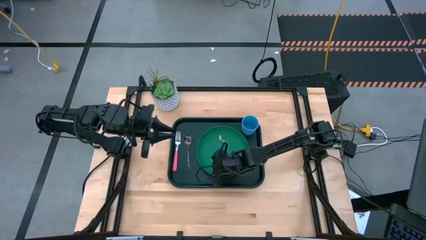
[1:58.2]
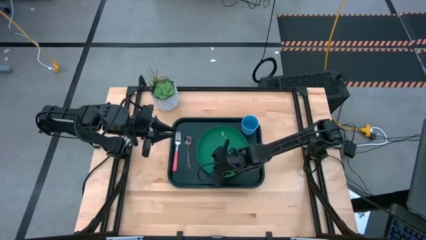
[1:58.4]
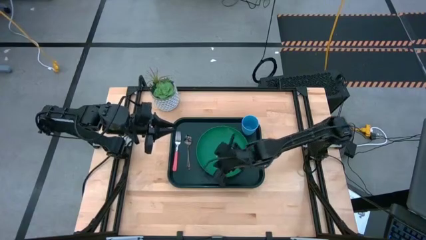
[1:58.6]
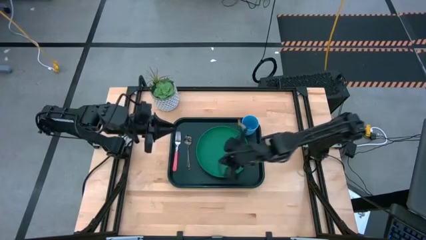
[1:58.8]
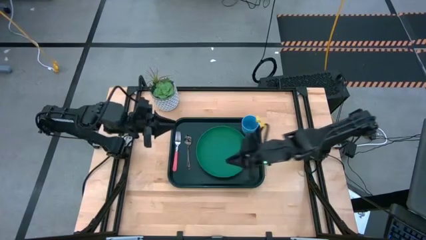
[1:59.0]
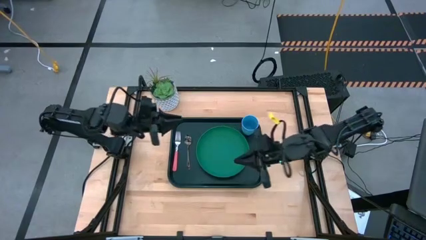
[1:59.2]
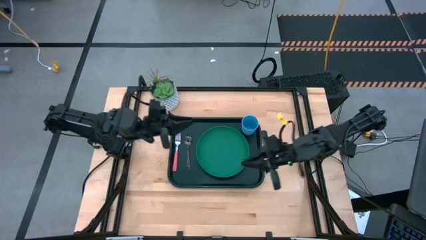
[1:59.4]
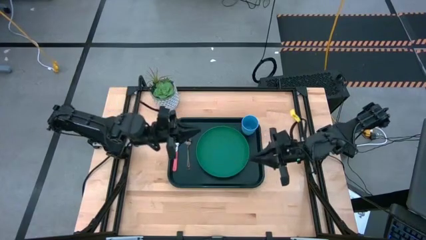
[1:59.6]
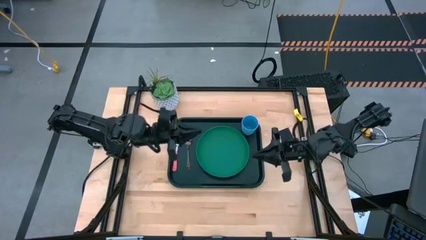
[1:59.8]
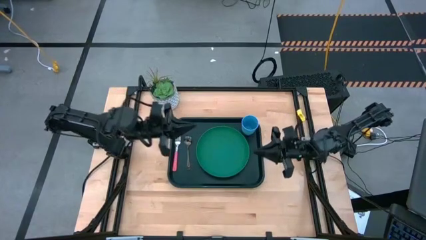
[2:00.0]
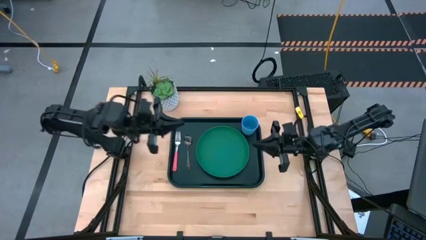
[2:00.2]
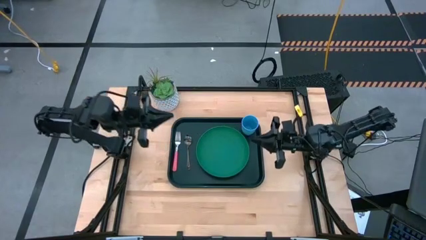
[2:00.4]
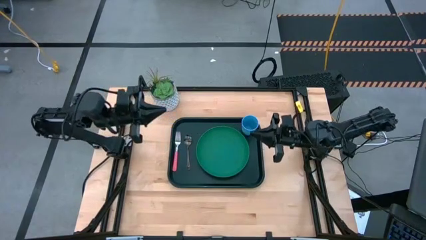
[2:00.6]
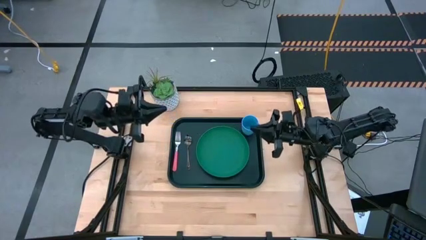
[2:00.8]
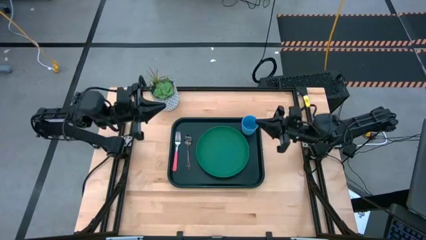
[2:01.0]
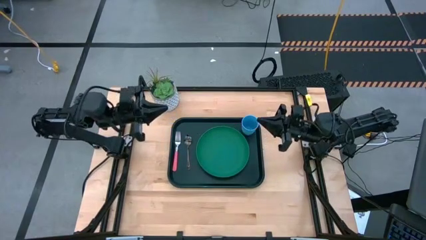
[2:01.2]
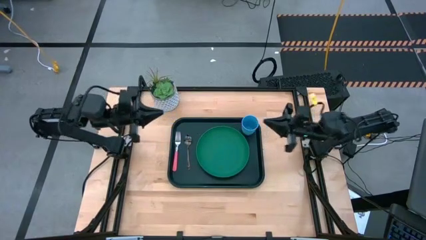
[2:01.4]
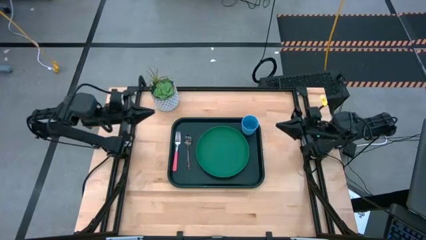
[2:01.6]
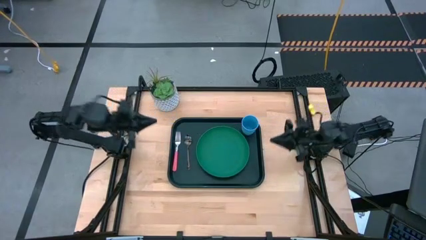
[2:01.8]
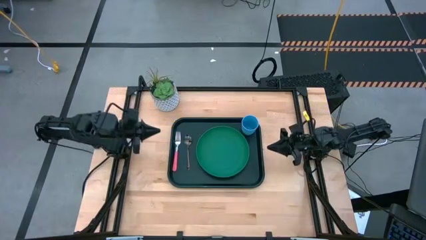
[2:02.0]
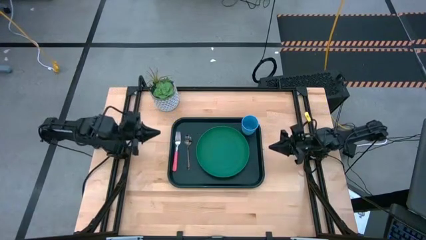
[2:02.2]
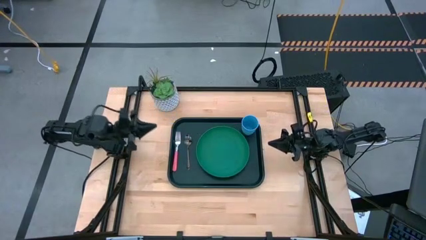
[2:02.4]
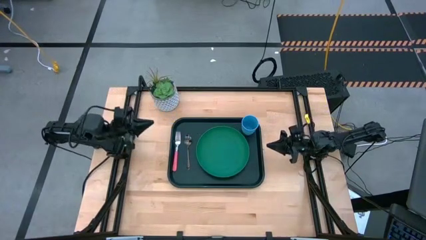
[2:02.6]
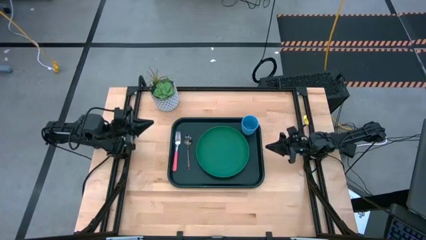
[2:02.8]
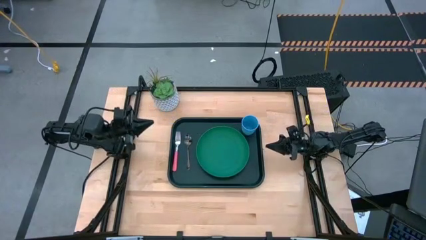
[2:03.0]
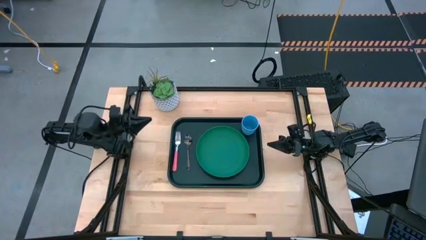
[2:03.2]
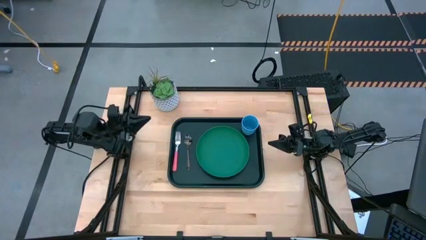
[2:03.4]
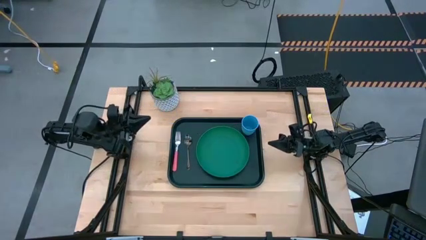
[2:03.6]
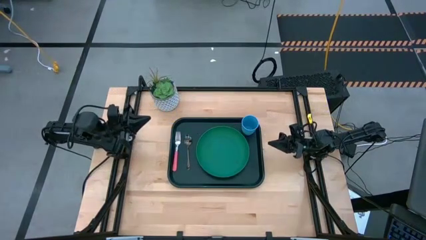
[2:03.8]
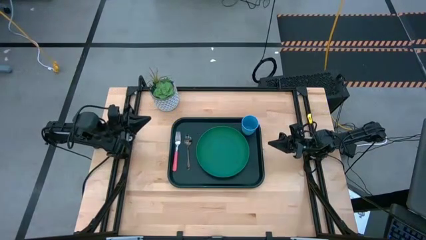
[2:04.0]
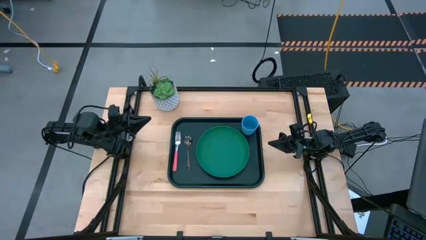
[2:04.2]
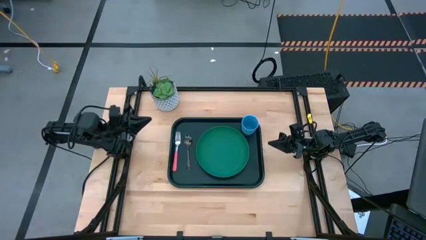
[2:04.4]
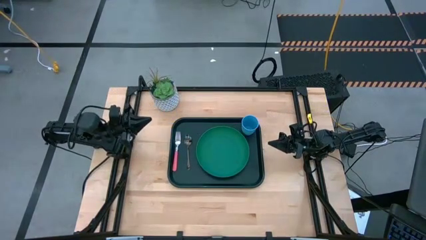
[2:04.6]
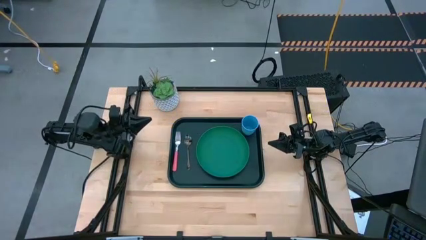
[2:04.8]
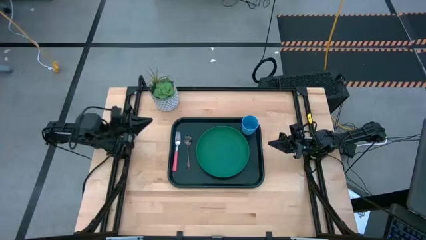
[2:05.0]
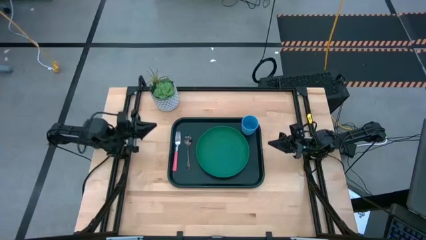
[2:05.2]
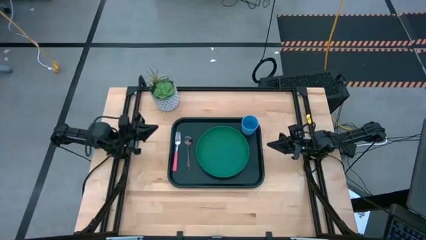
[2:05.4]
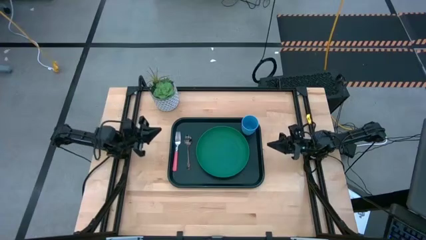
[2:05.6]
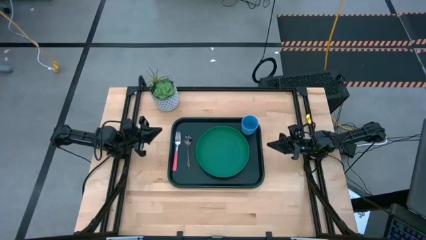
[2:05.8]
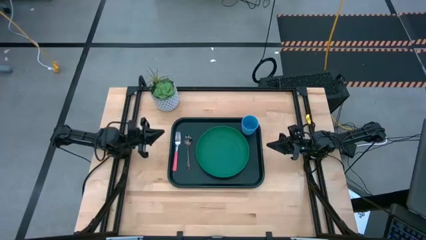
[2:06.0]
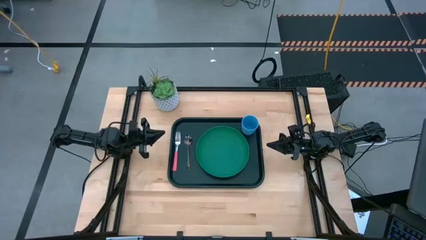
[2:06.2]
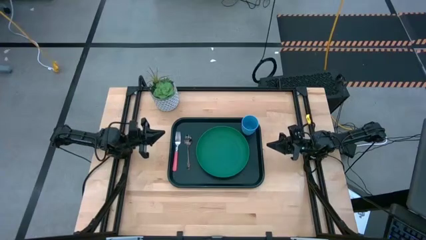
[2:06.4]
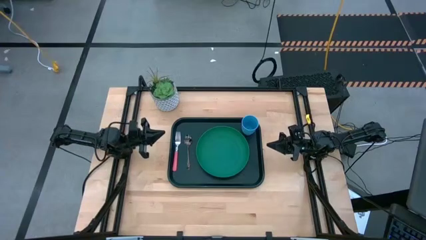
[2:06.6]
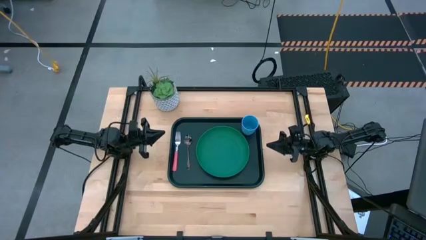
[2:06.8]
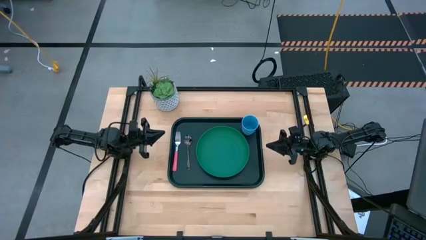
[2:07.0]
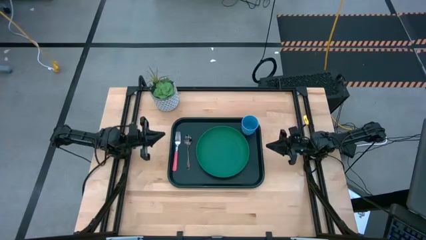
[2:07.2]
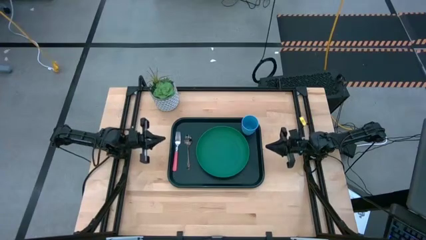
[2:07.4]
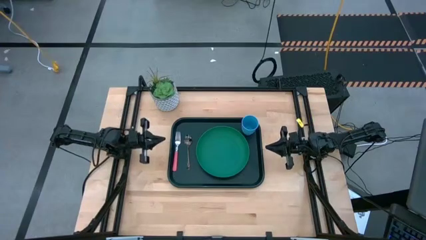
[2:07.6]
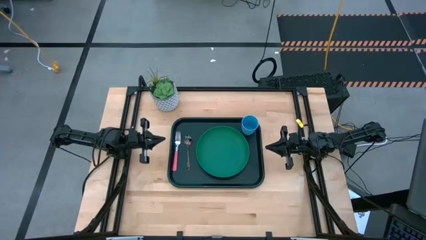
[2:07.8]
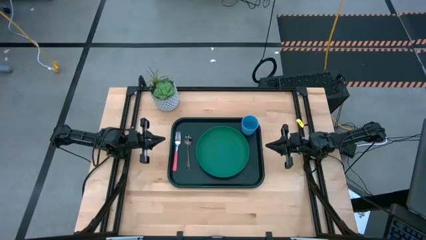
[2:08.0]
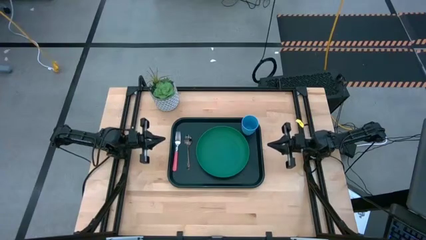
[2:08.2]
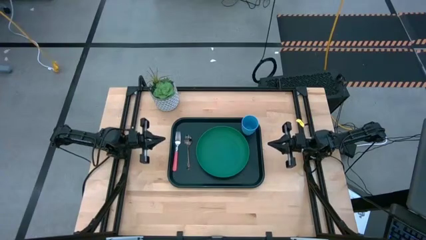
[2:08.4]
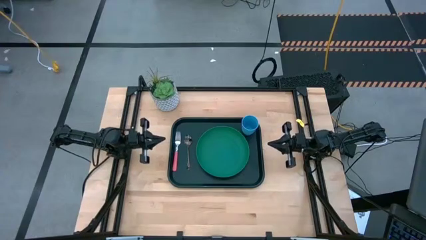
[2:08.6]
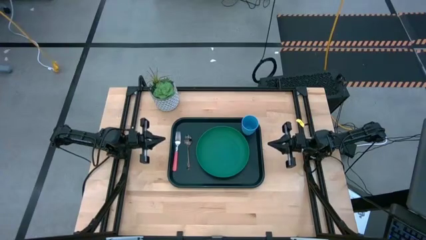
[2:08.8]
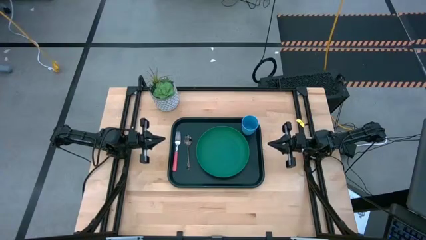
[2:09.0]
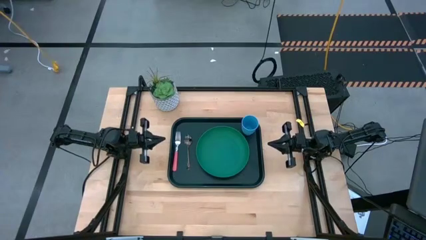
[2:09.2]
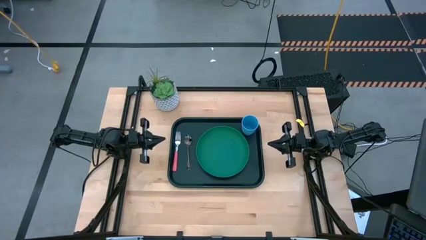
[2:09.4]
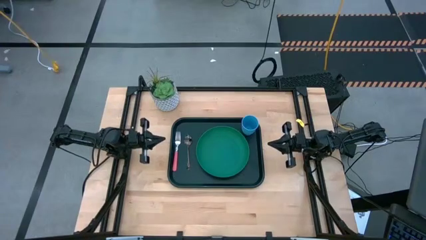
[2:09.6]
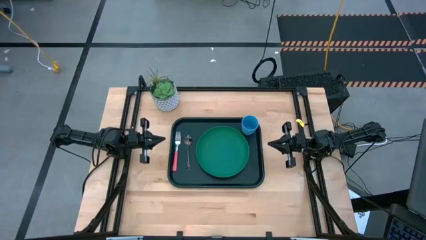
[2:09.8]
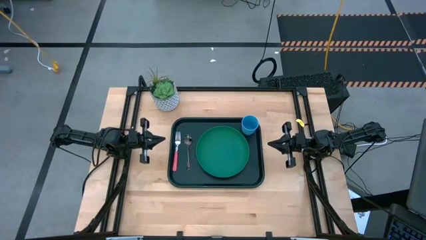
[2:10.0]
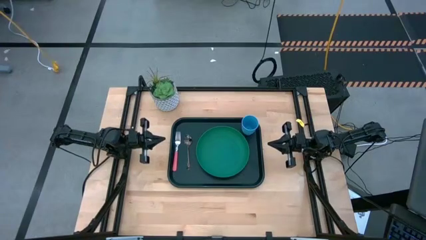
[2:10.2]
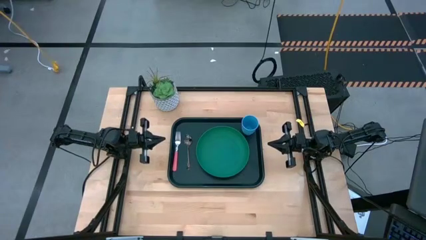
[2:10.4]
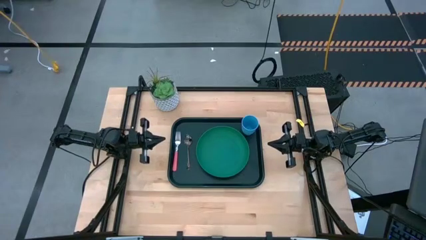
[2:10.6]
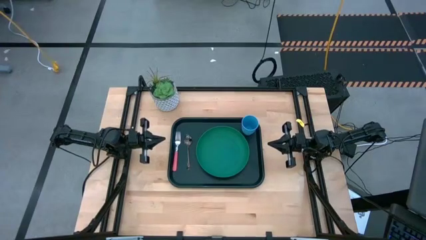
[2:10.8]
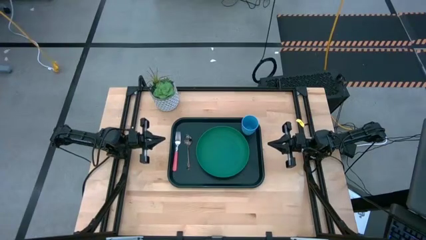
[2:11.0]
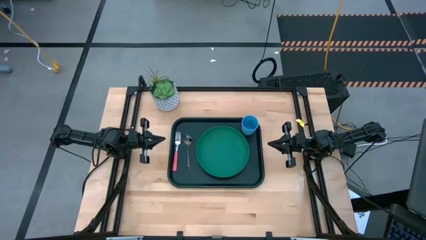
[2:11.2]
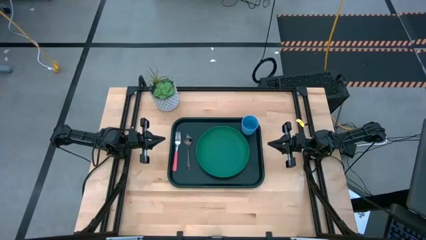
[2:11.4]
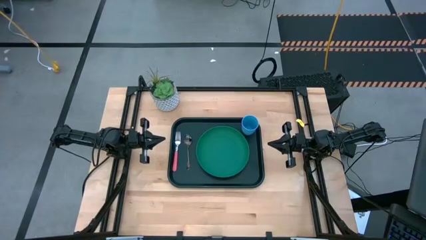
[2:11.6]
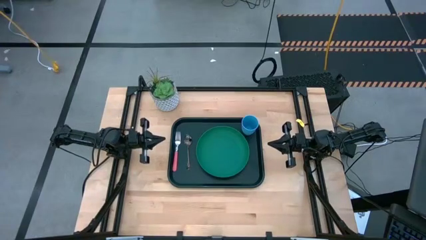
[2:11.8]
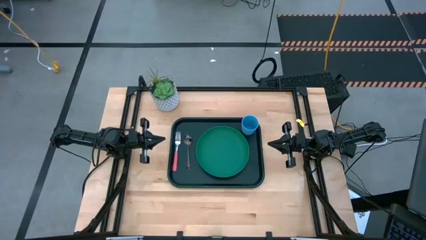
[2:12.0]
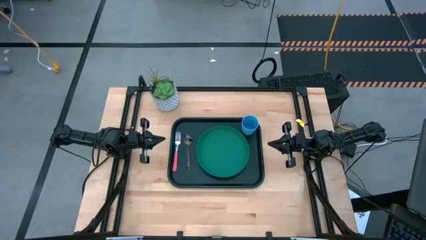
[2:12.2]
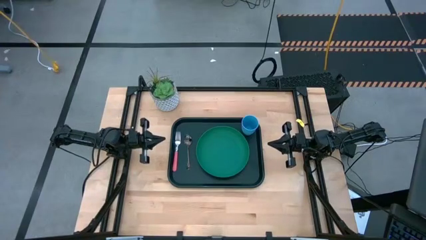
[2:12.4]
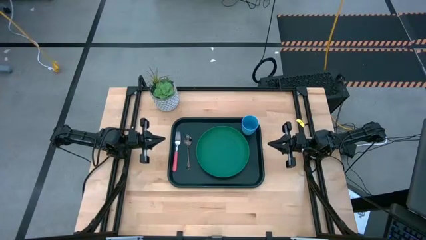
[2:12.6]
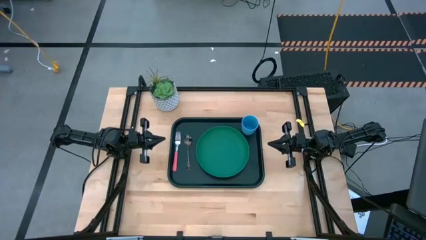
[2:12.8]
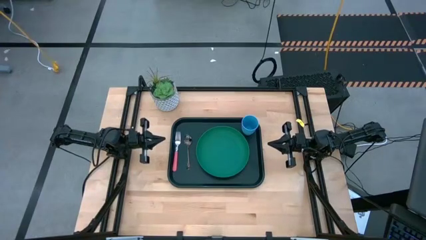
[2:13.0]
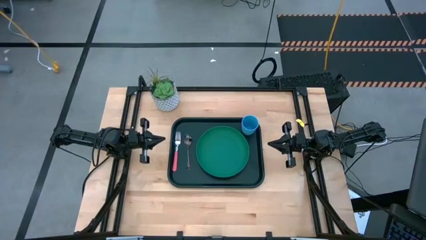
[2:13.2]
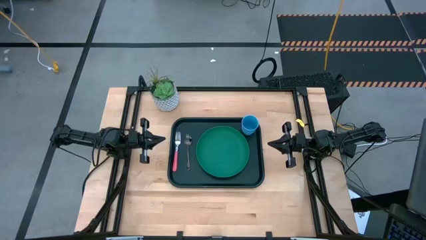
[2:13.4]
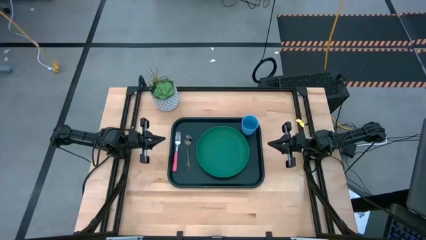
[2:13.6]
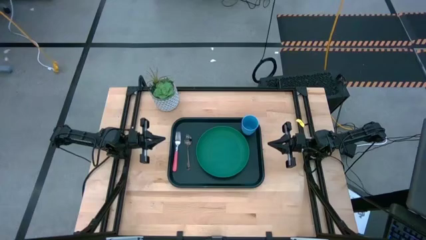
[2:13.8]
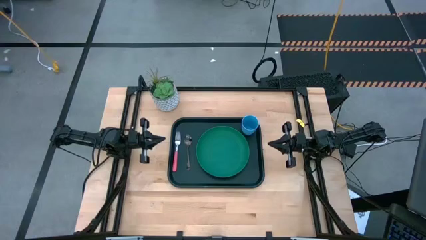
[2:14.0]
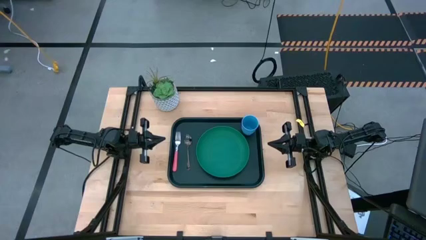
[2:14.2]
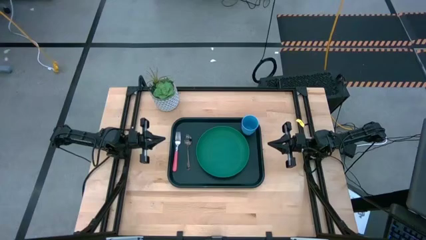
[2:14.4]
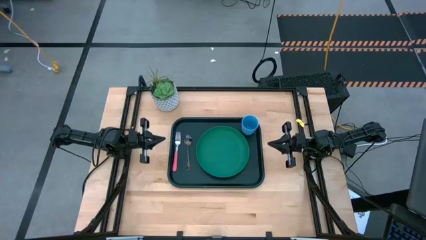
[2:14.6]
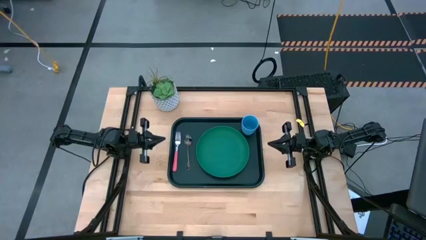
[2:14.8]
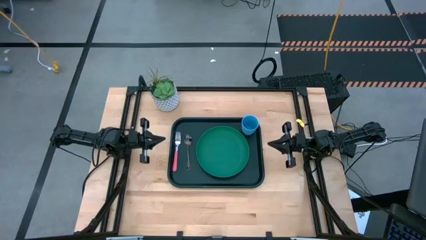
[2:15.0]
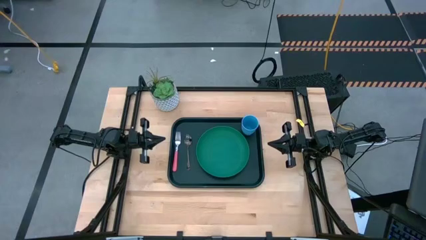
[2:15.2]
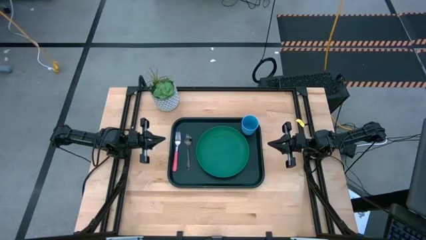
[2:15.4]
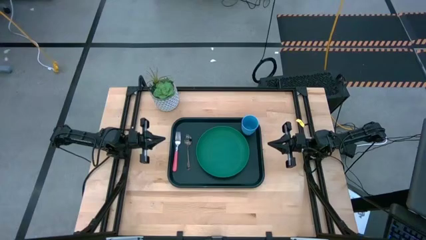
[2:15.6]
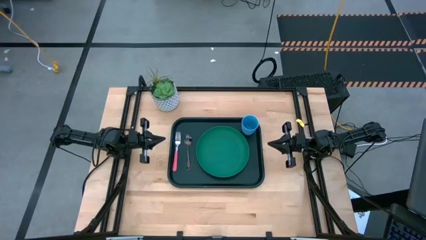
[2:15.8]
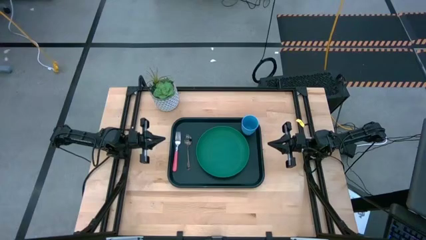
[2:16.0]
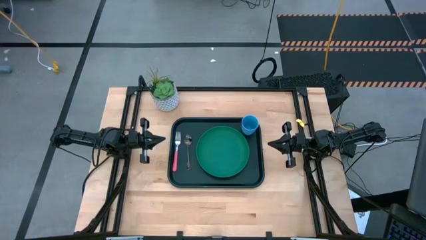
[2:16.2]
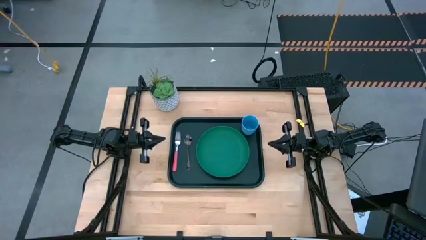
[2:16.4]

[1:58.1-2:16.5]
Task: Pick and place plate/cup/fork/spoon on tray
Return to Home Position
